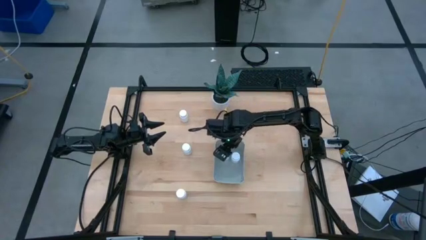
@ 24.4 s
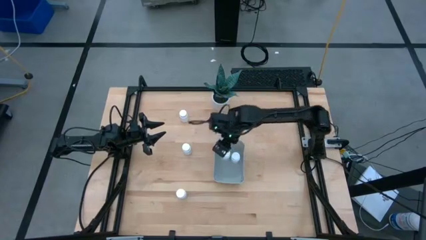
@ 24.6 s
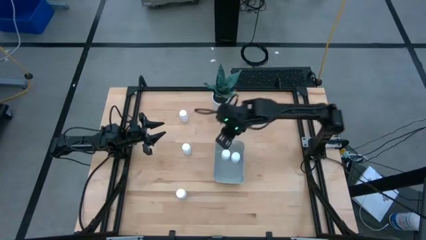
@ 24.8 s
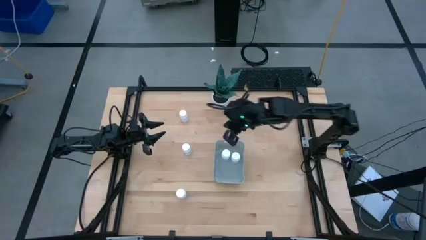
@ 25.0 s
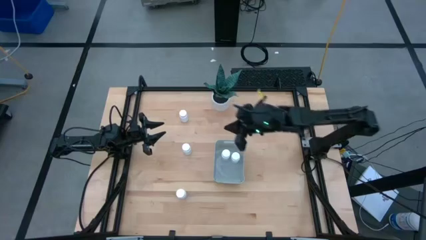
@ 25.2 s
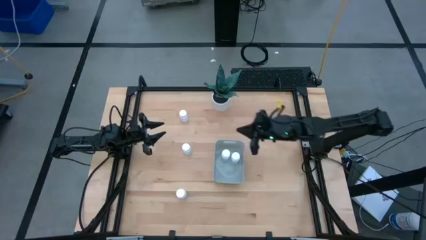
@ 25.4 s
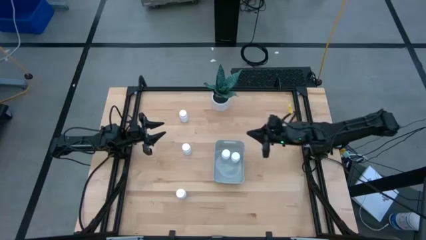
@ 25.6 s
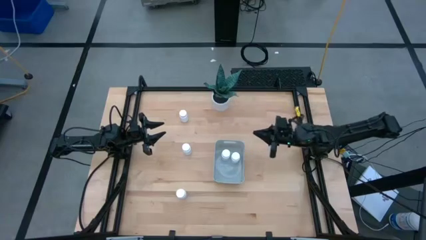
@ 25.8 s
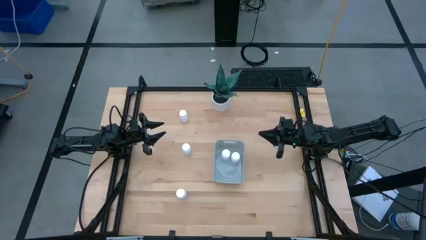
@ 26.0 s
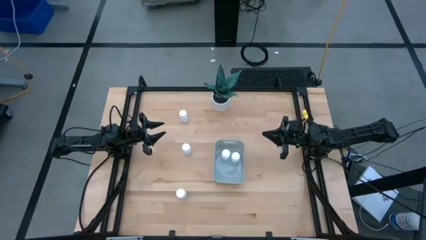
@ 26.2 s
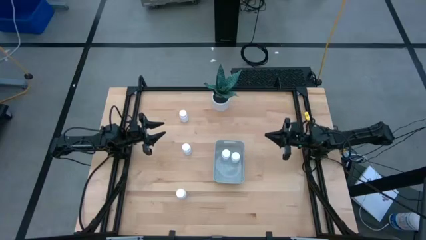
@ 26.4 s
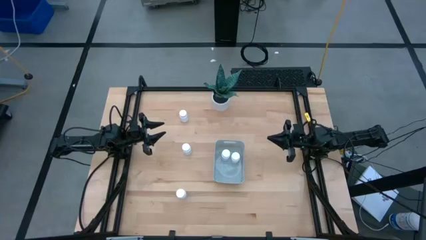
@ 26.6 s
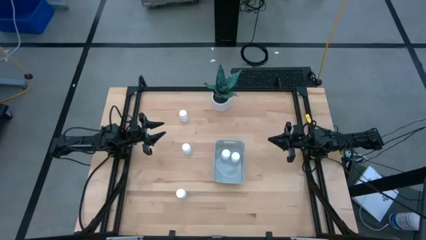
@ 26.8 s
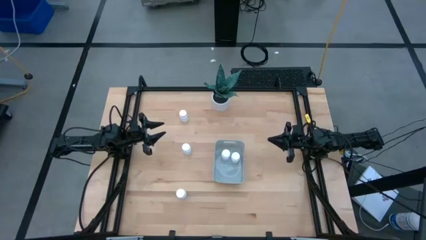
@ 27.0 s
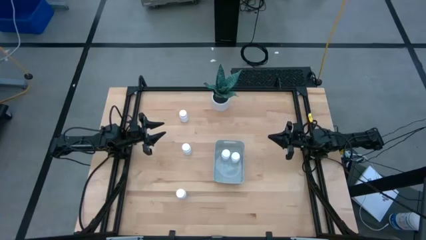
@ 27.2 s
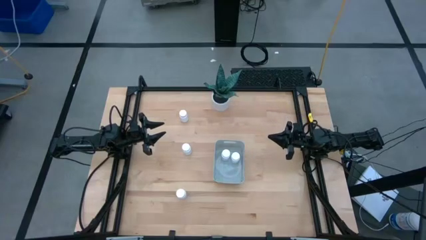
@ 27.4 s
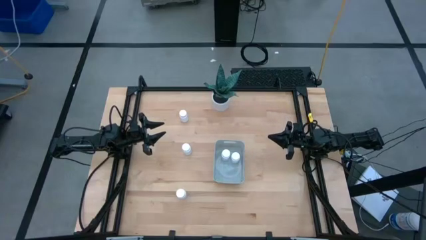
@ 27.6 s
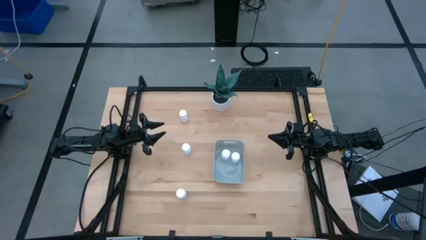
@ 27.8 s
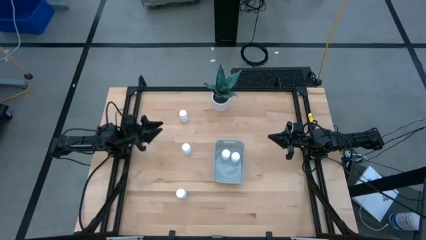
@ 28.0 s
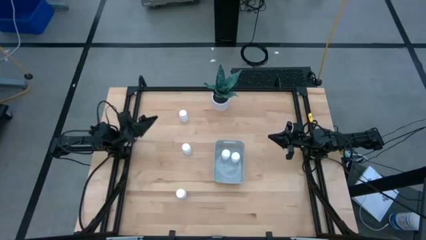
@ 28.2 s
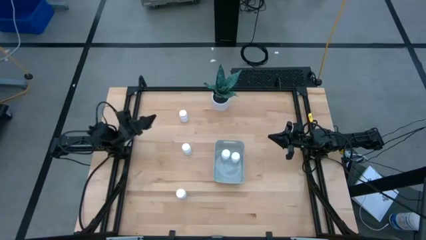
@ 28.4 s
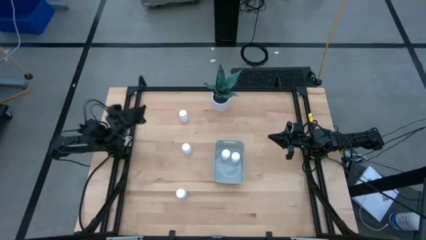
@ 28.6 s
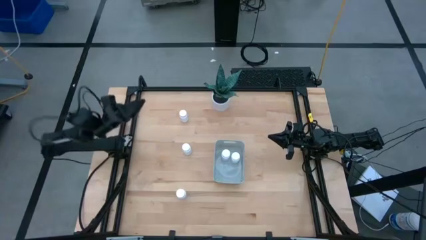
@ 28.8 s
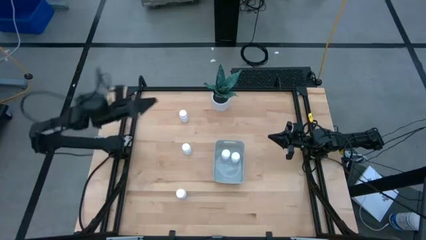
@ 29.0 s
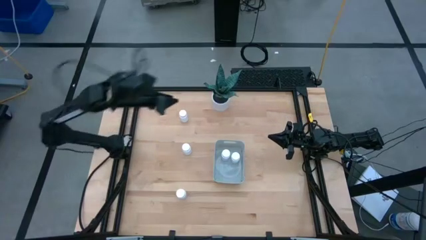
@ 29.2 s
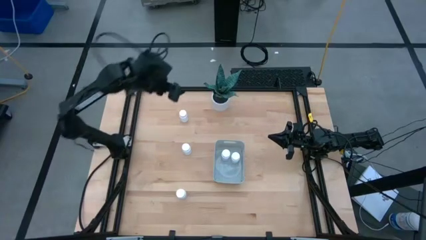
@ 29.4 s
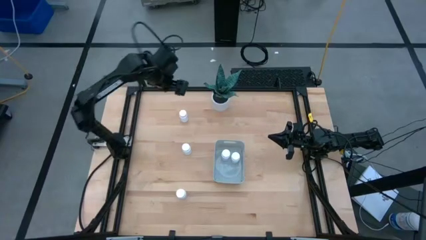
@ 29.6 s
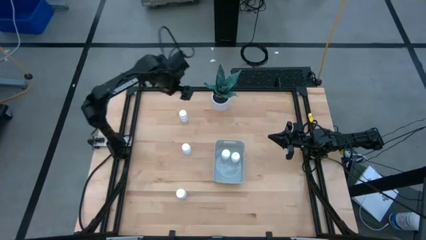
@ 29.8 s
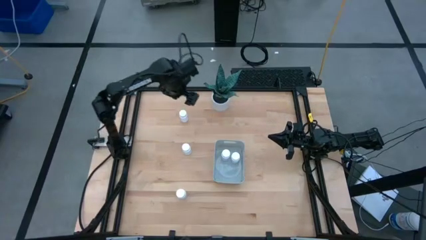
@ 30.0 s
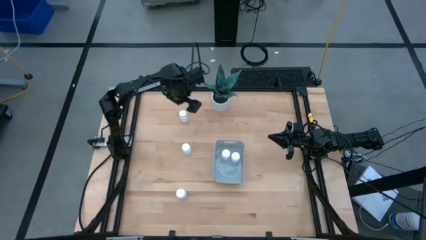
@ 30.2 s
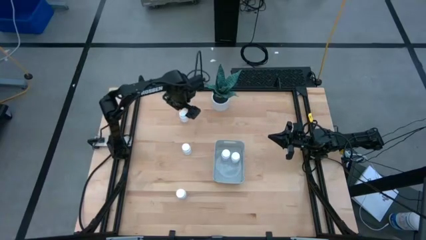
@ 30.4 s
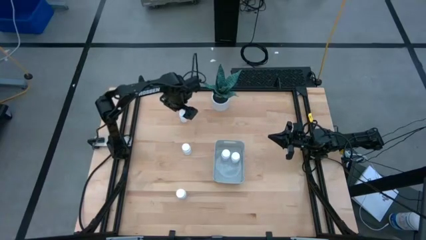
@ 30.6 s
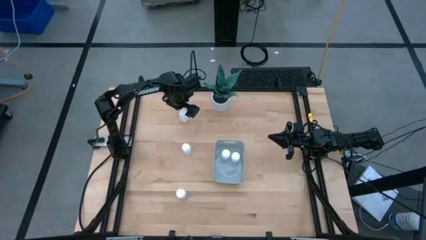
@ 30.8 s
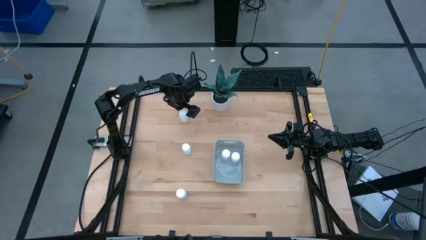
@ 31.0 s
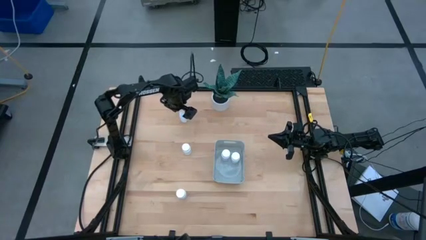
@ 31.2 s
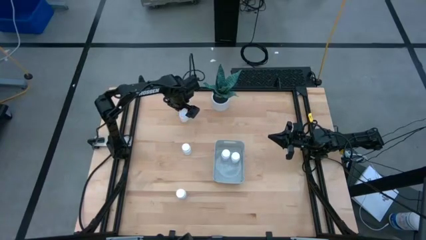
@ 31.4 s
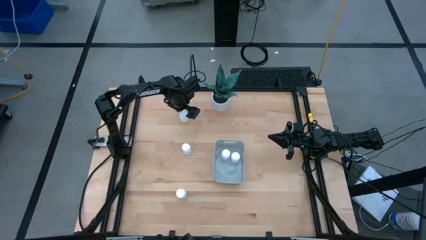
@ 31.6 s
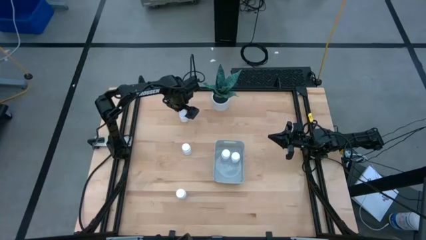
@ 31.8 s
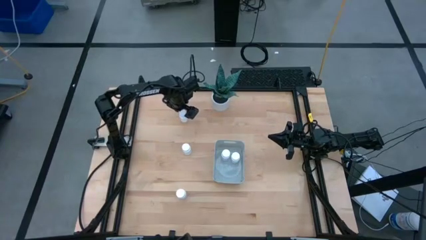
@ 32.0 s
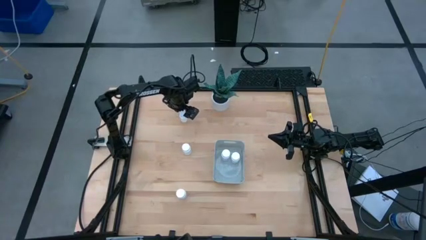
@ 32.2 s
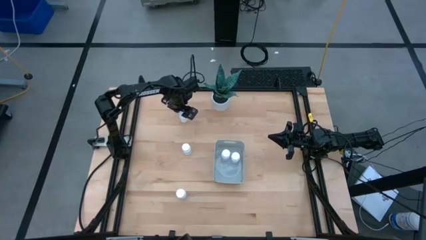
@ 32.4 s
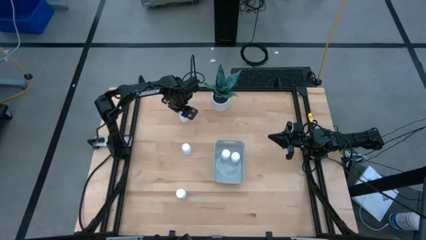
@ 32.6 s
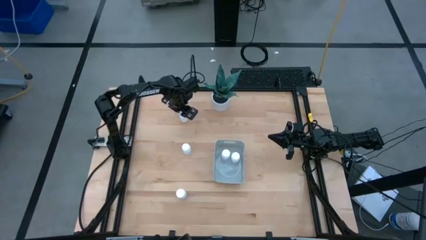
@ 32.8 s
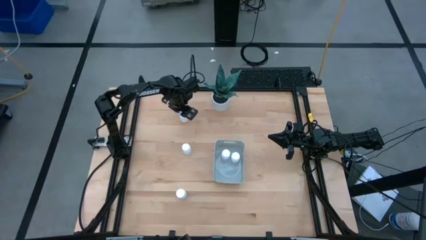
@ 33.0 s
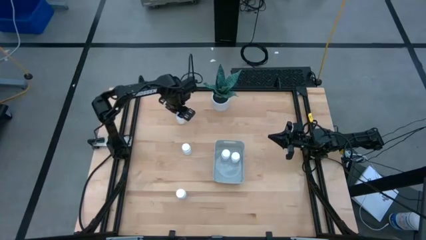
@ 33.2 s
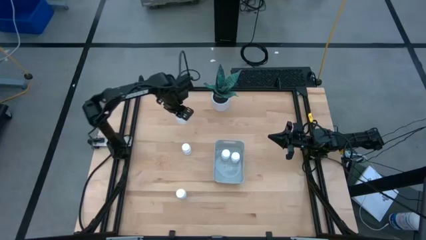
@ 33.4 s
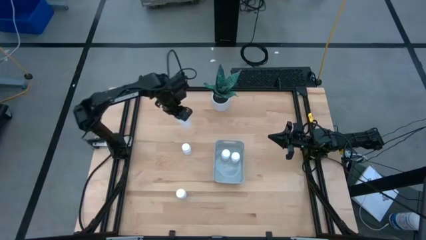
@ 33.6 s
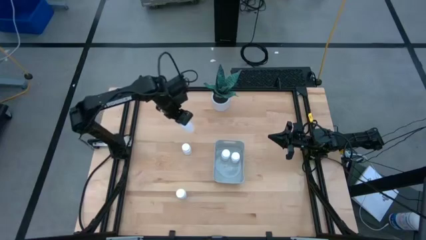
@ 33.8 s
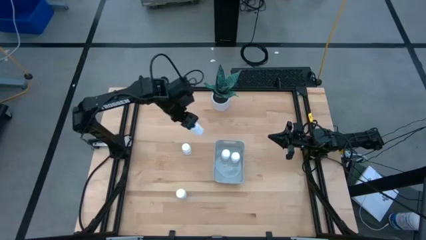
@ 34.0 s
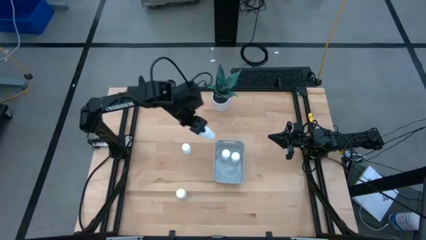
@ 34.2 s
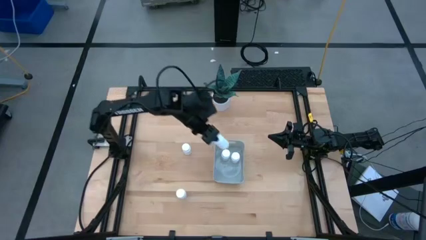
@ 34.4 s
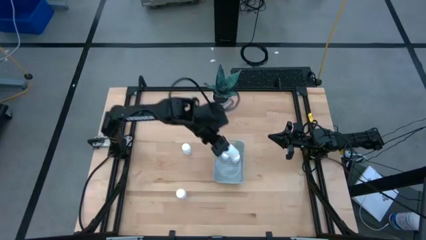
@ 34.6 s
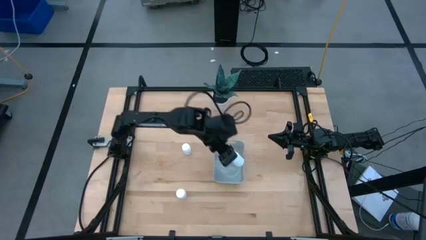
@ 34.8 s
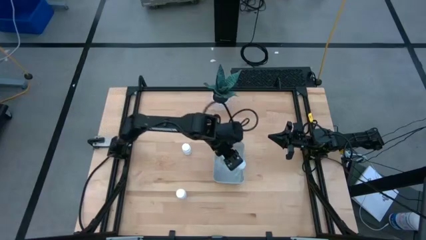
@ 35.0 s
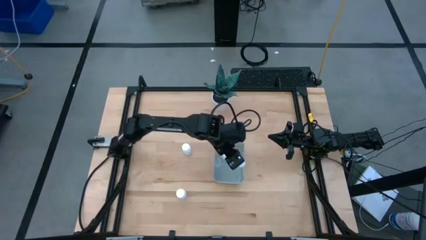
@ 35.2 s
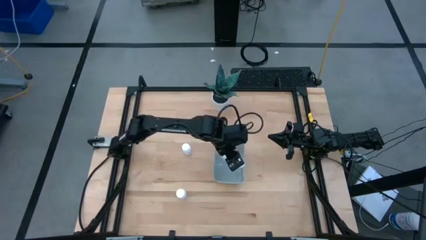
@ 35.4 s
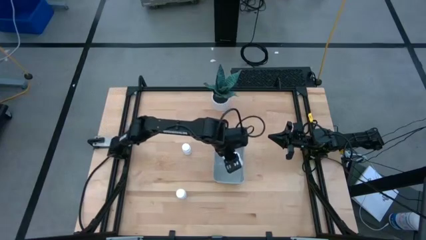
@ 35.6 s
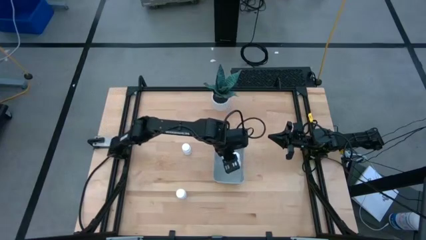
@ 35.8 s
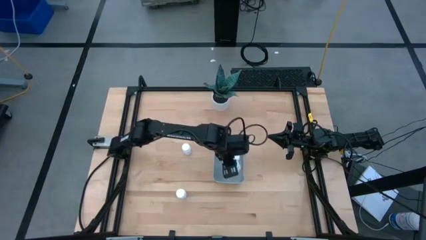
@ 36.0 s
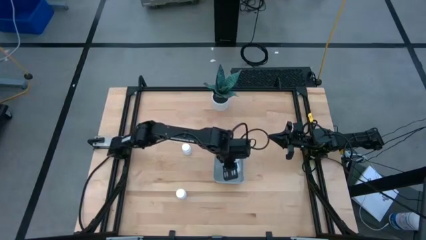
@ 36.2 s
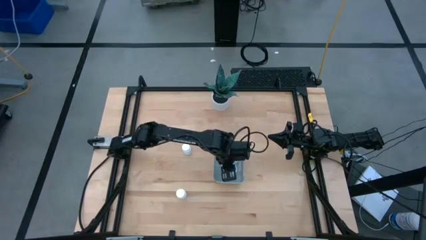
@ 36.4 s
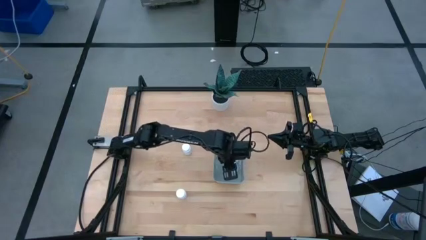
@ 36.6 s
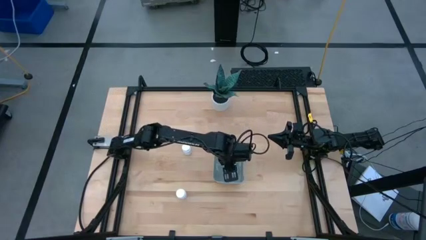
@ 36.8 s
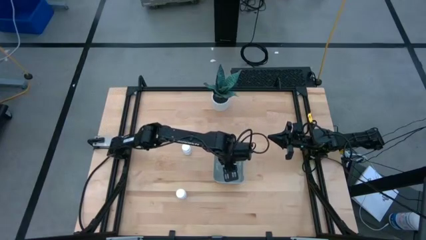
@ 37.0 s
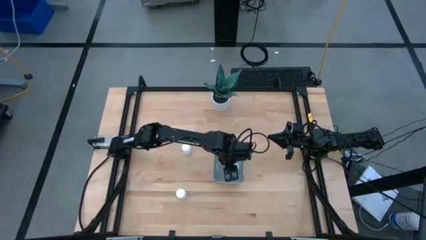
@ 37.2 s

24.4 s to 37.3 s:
Task: Pick and place pill bottles into a basket
Put the white pill bottle into the gray bin

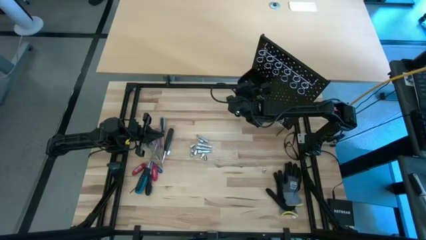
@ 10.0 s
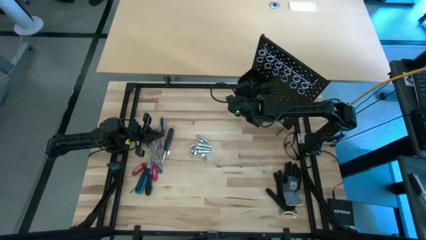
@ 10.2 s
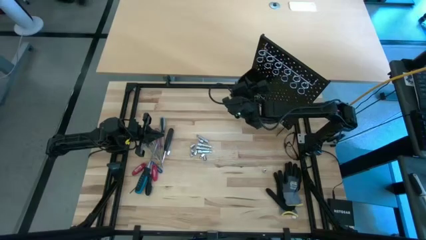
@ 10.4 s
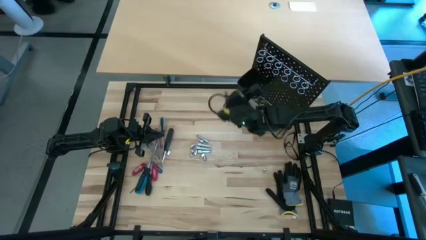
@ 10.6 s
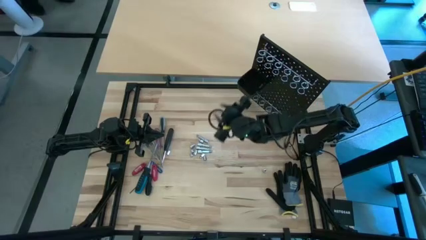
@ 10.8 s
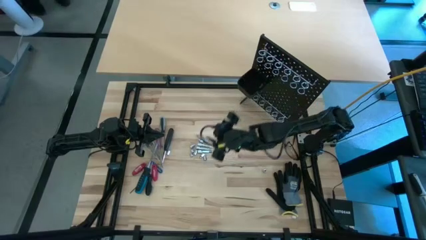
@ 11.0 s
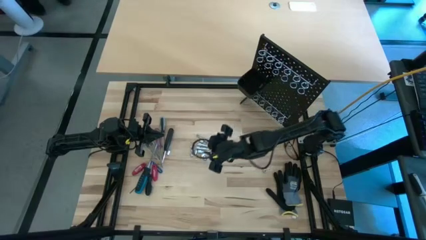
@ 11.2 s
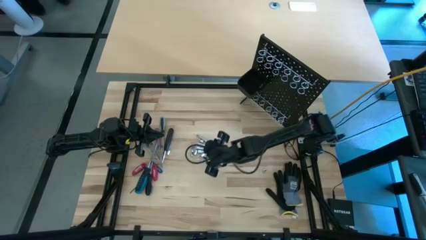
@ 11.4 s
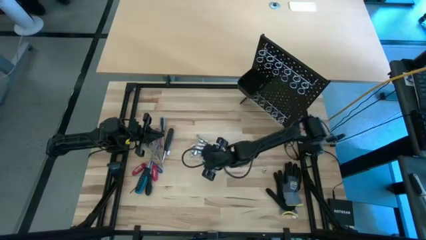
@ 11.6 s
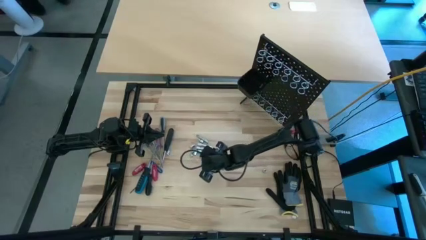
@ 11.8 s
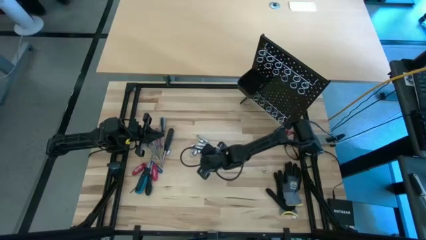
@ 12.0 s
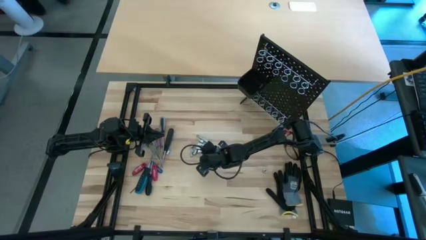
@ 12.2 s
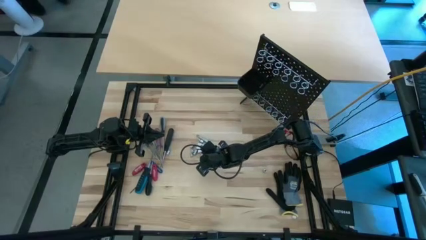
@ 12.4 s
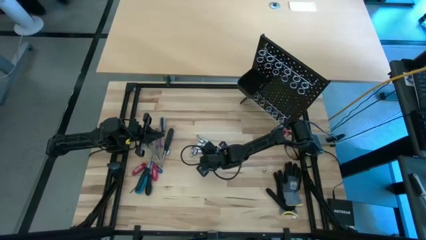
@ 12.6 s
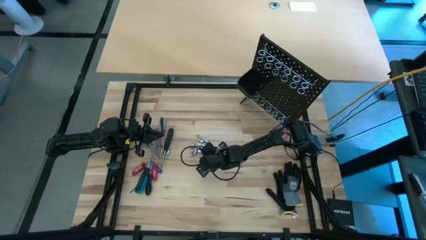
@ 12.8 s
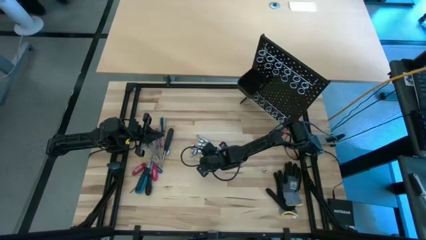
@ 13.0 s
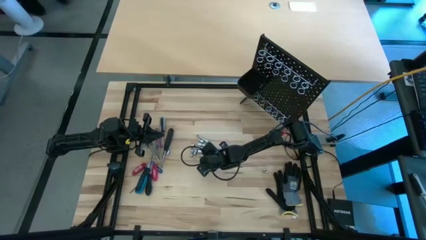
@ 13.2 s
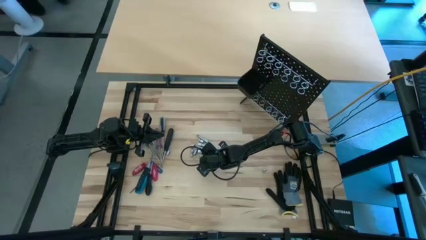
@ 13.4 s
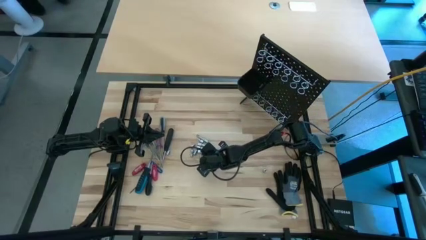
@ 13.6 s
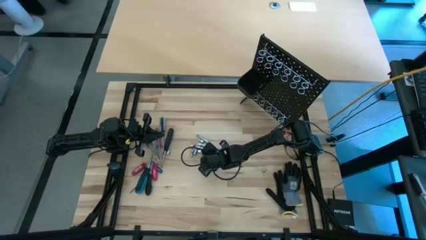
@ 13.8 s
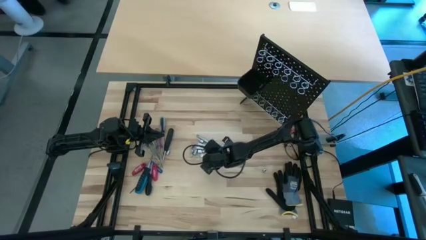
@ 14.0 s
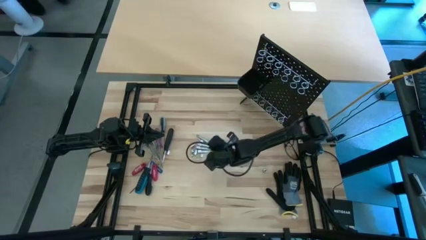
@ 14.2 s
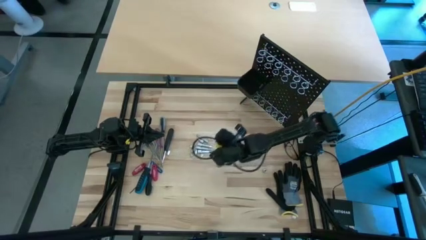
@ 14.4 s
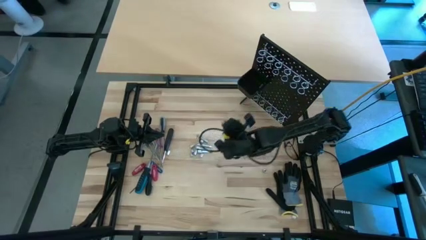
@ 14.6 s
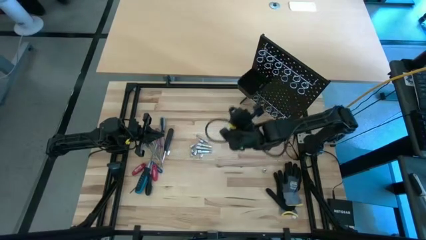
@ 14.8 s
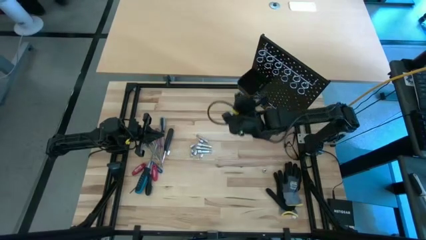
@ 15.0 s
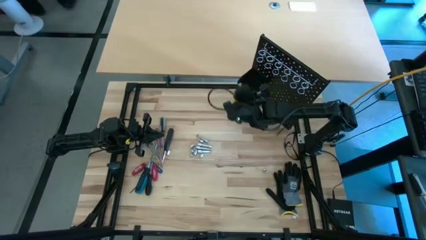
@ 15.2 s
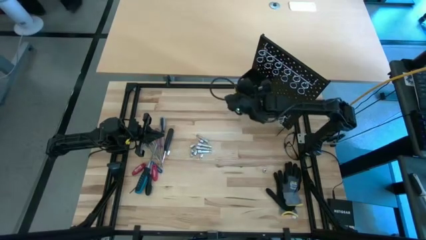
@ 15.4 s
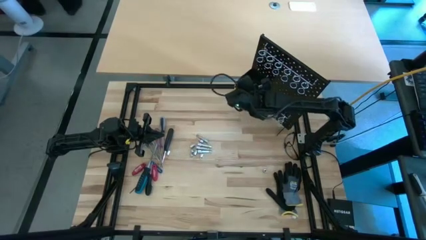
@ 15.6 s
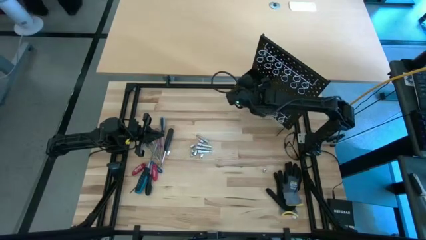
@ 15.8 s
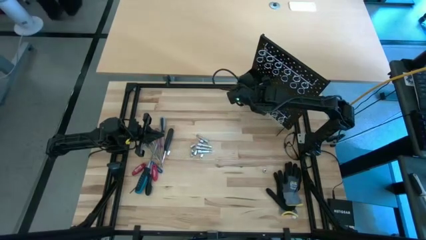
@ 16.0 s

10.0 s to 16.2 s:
Task: Hang tools onto peg board
Put the socket into the black pegboard bin
